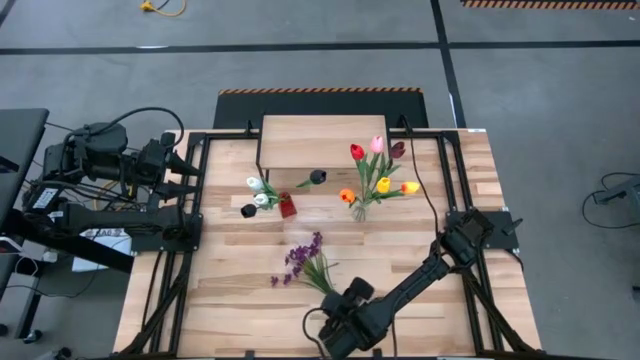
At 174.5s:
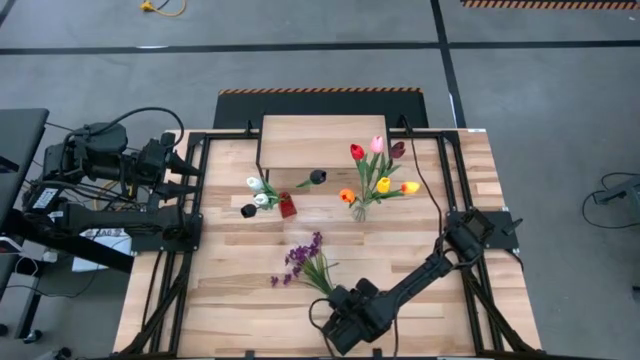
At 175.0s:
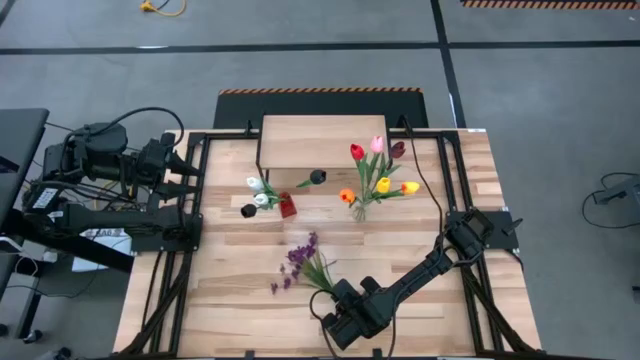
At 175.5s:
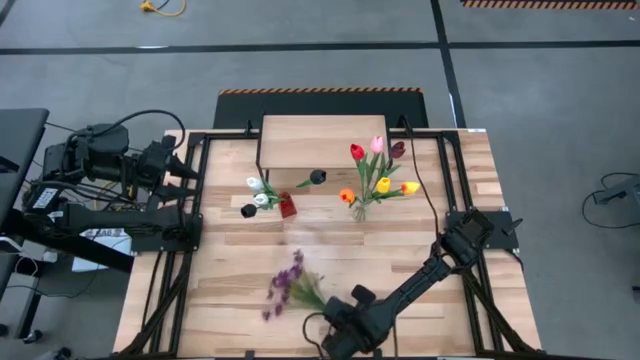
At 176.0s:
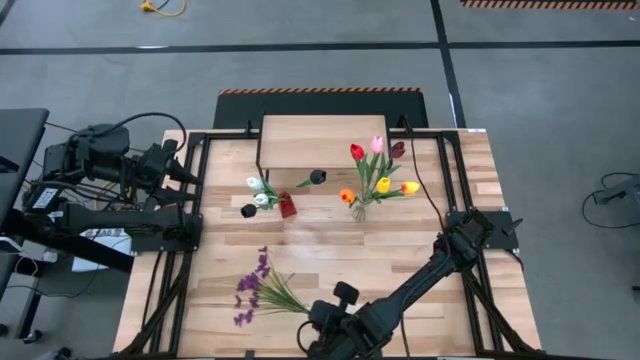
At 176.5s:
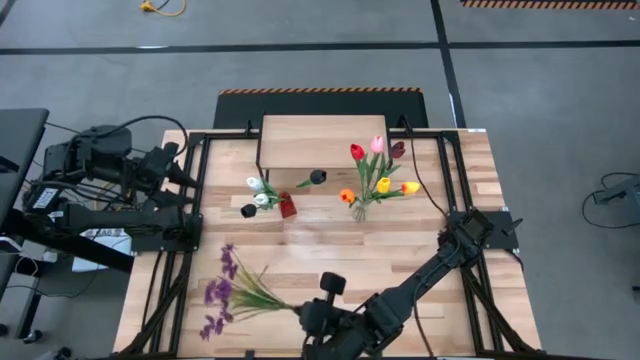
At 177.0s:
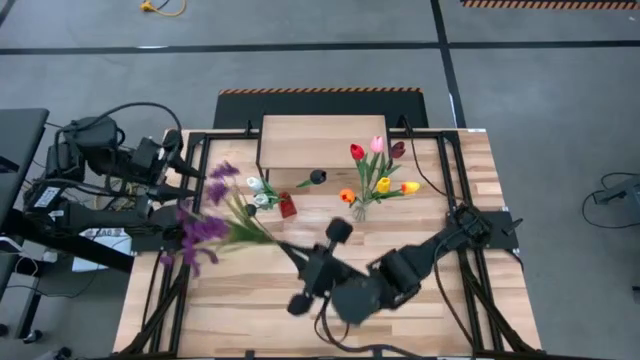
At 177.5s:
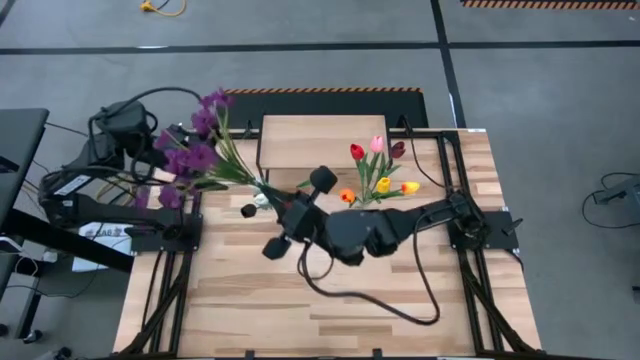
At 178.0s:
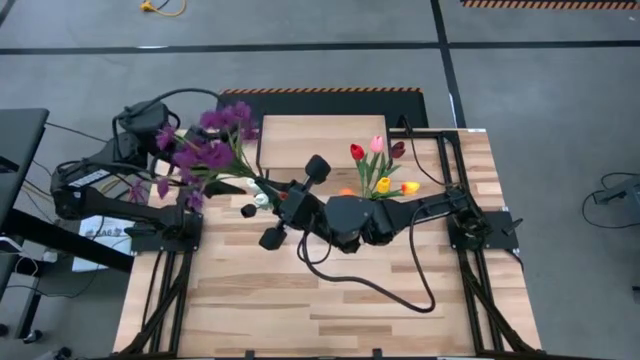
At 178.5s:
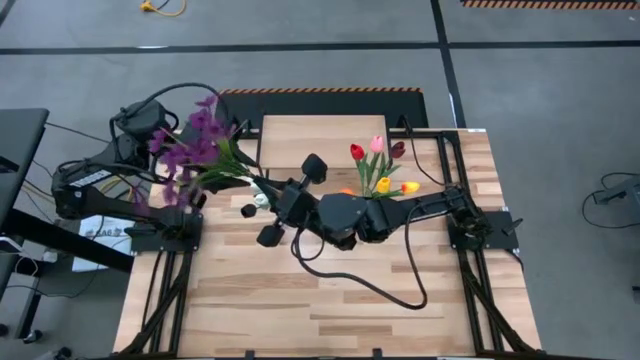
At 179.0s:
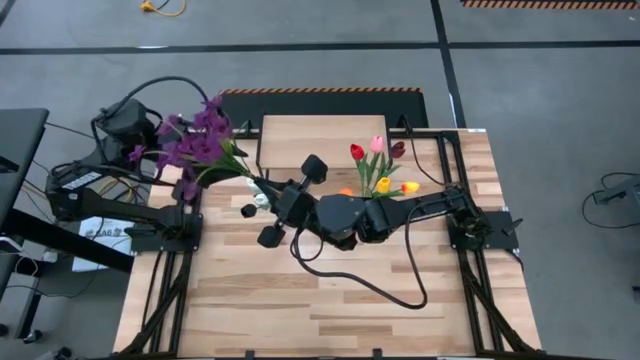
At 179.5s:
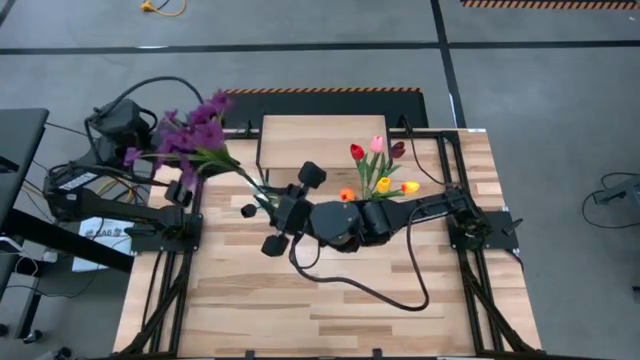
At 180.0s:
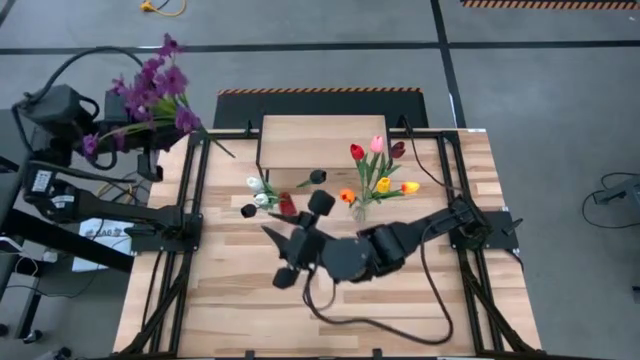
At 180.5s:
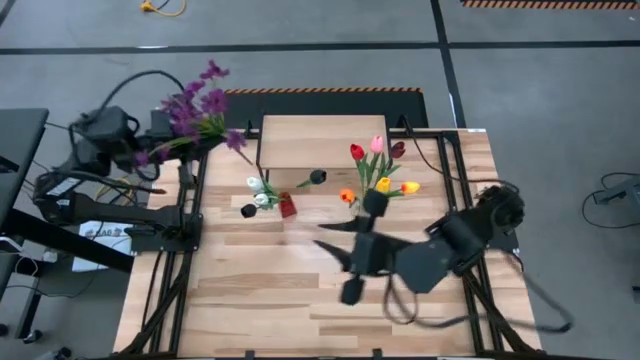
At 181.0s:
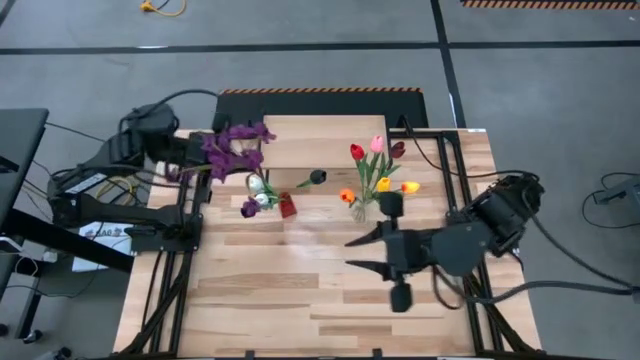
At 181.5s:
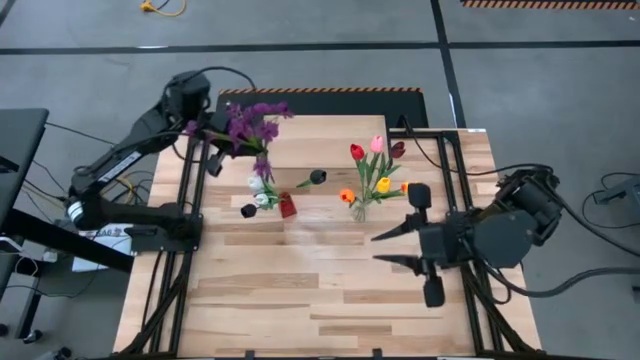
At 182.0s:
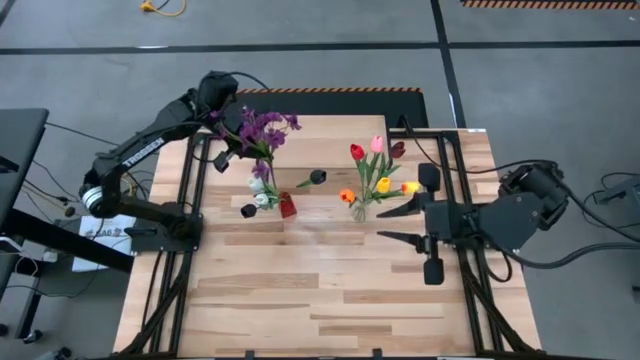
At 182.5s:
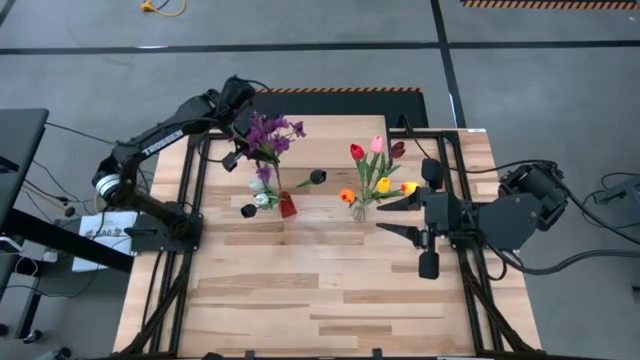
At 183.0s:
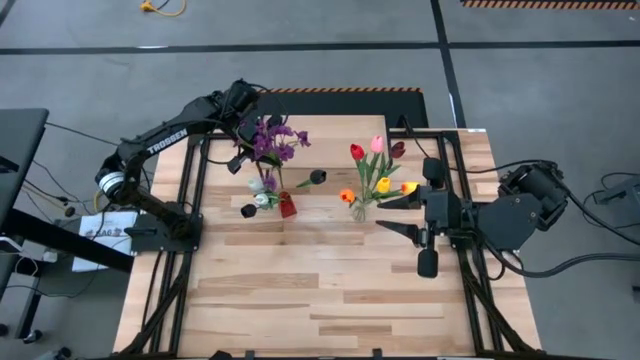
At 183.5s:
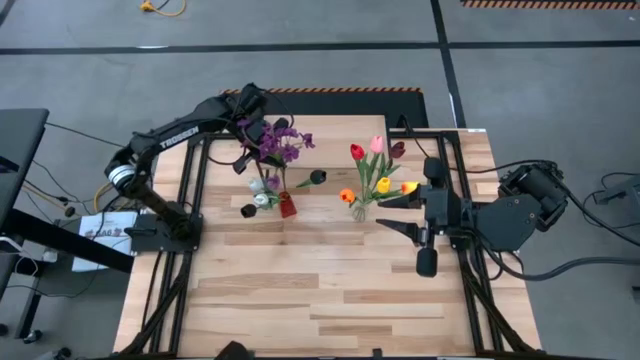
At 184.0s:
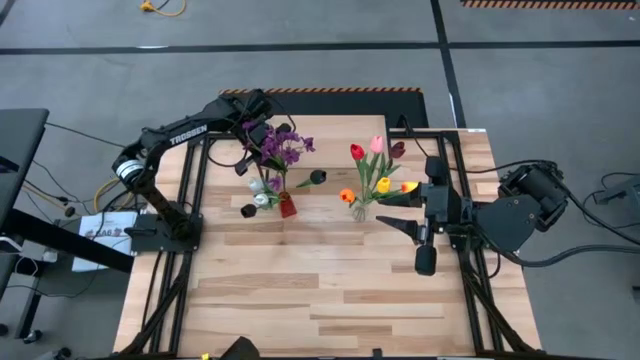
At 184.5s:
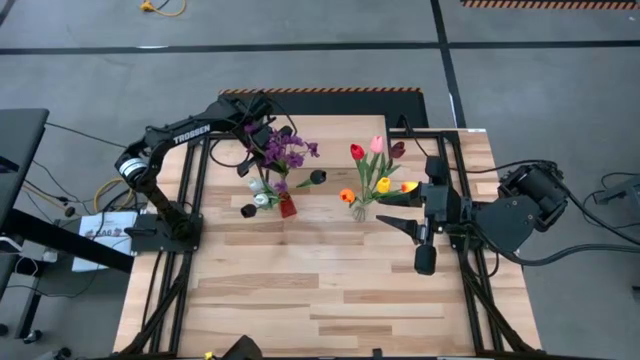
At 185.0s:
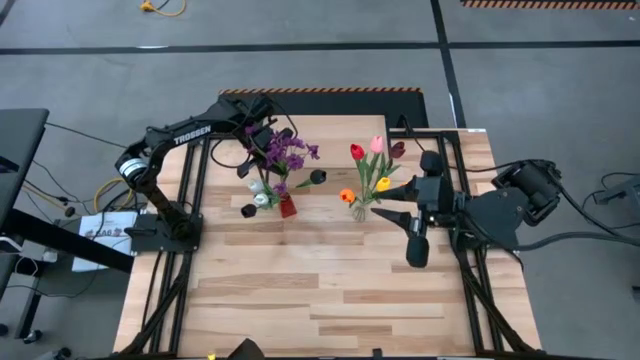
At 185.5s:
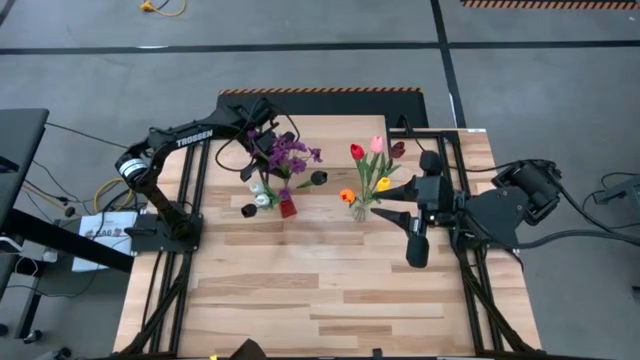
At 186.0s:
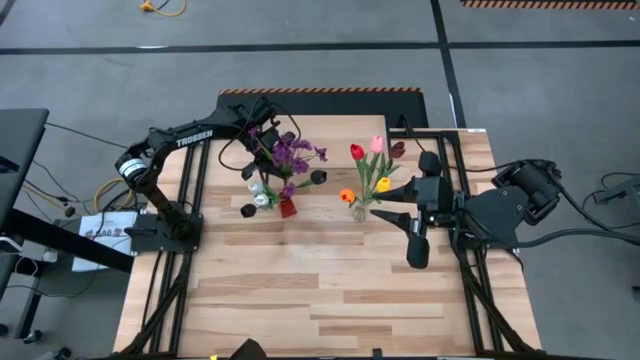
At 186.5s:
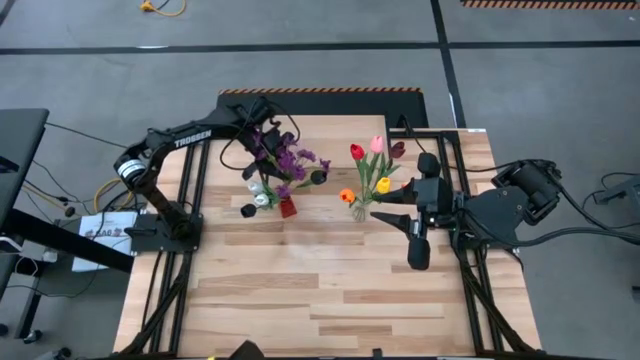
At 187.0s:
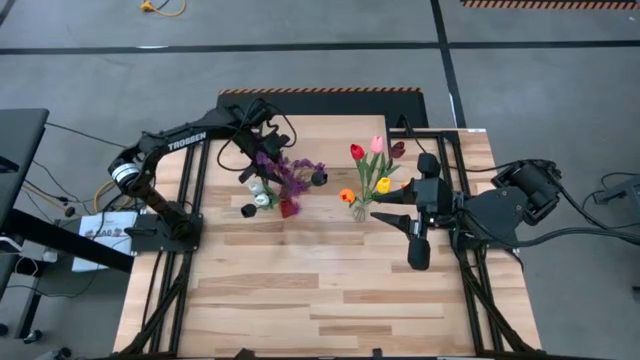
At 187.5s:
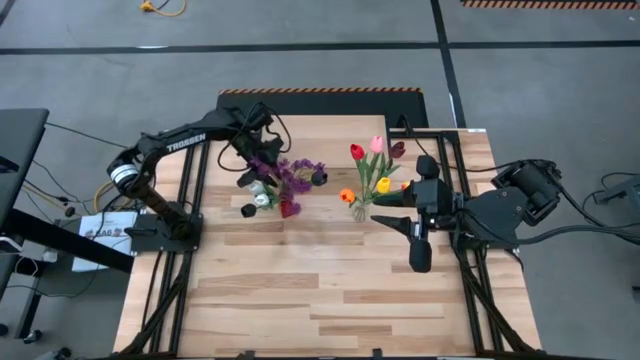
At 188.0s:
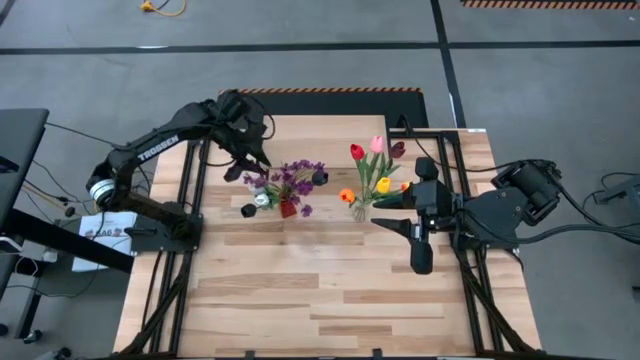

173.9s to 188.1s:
Task: Pick and place flowers into a vace then onto a shelf
Put the purple flowers into the red vase

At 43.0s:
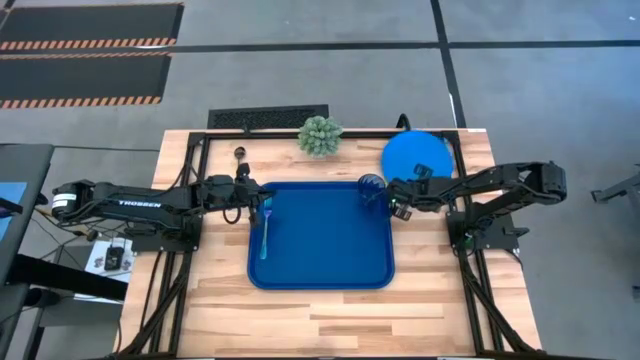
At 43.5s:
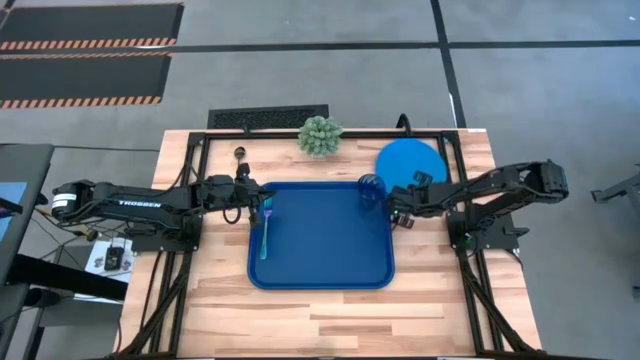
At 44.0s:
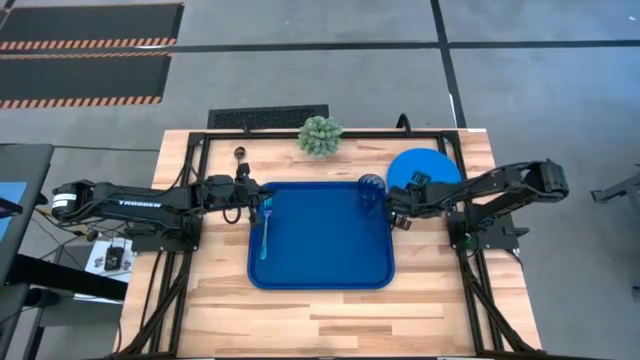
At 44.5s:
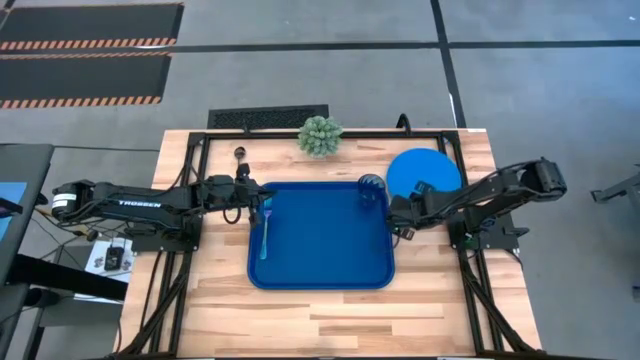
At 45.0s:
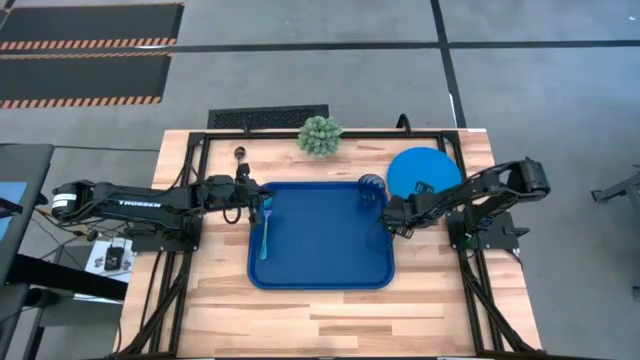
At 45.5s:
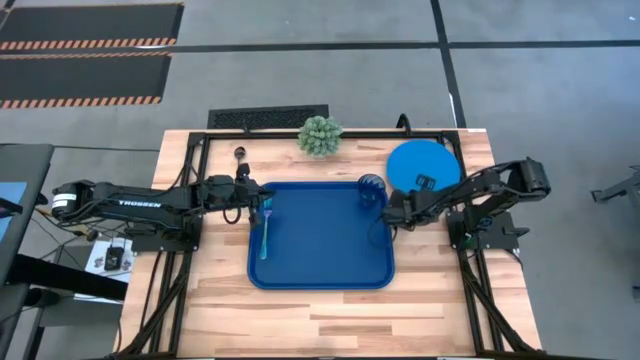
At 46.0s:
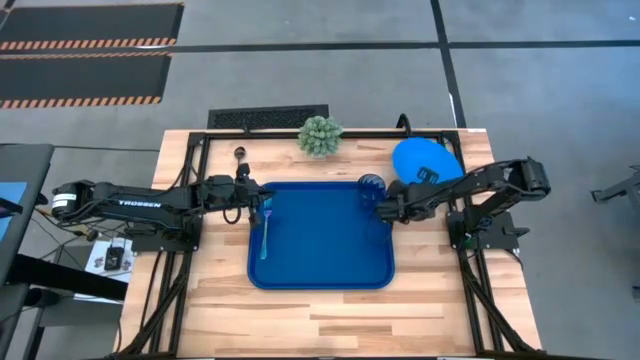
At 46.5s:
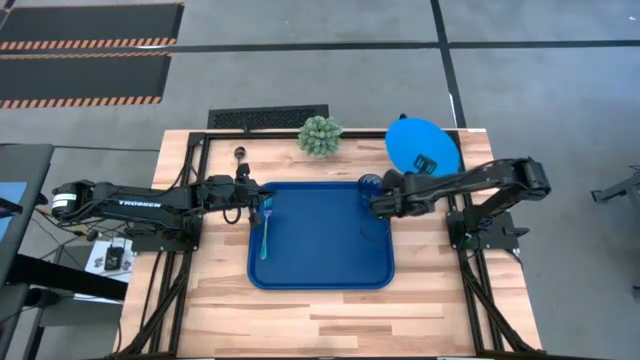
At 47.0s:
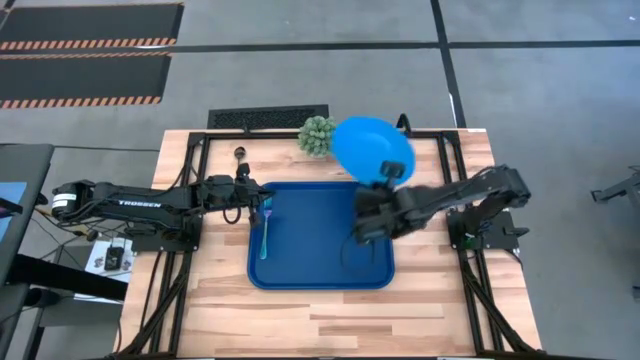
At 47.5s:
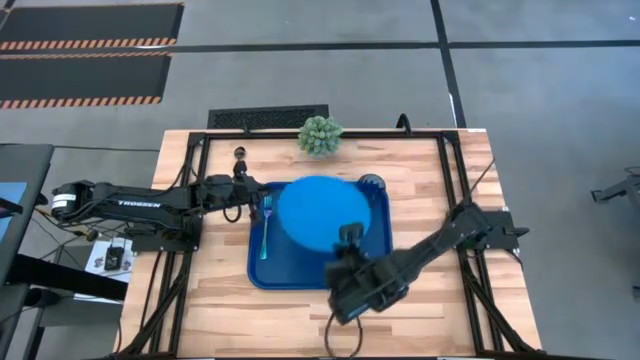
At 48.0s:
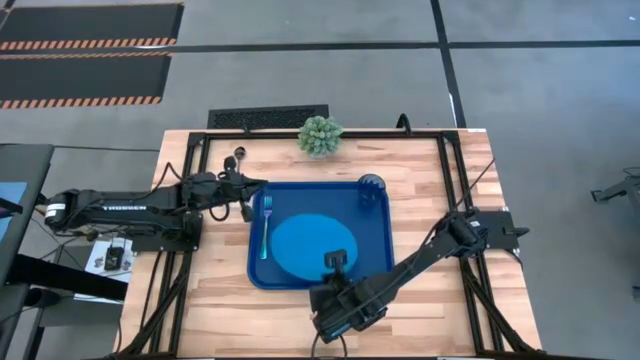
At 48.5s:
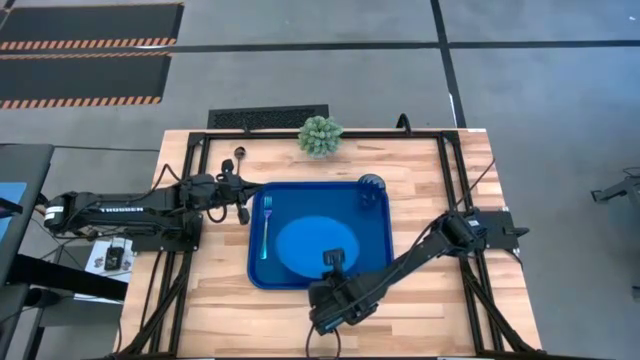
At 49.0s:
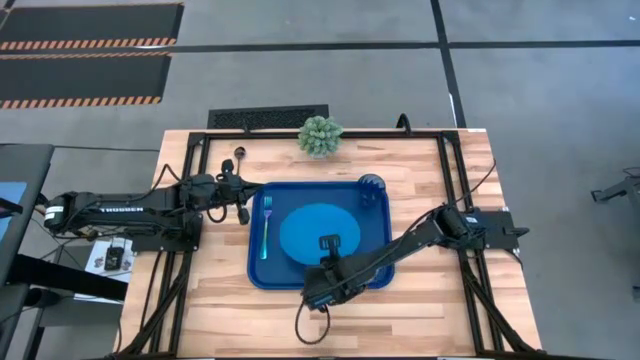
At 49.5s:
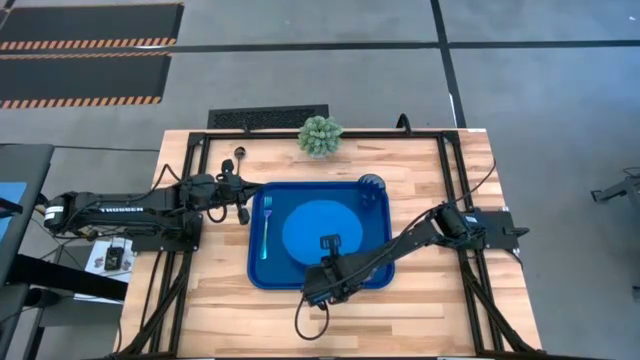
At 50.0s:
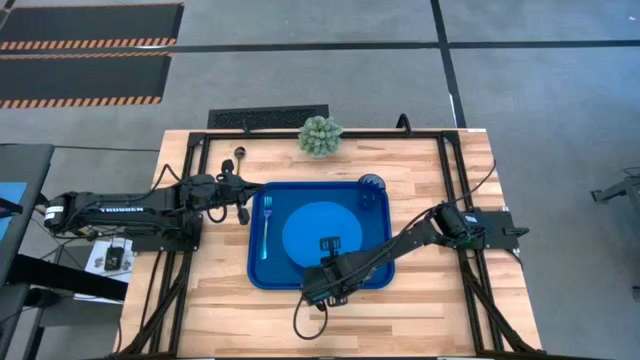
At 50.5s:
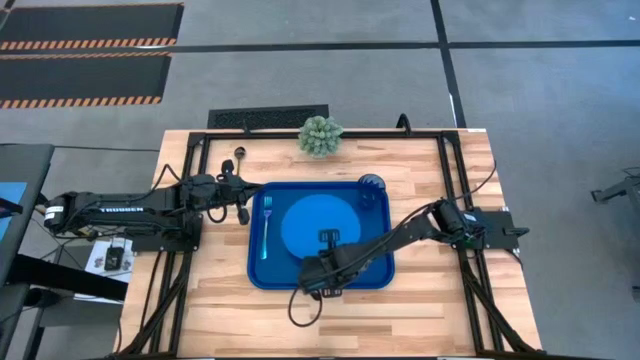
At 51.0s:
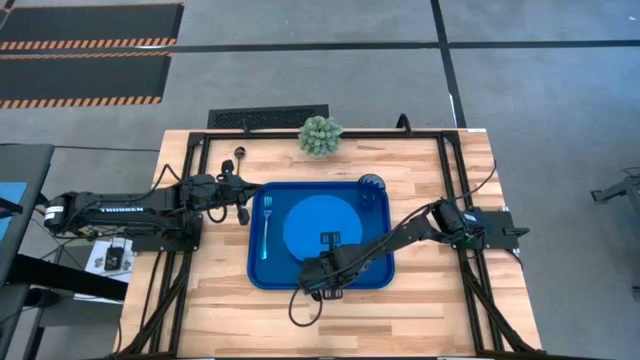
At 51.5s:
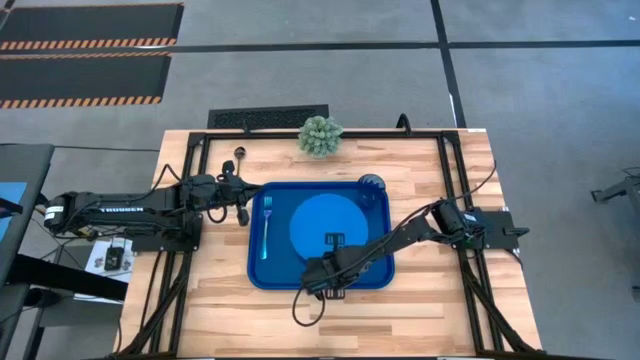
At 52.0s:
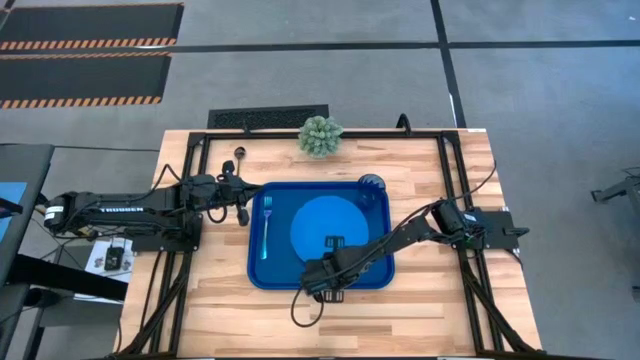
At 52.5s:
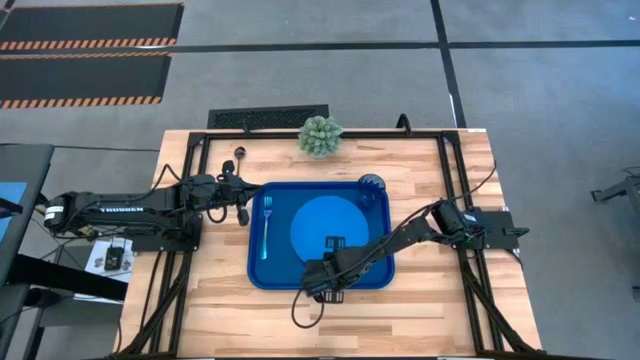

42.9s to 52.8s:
Task: Pick and place plate/cup/fork/spoon on tray
Put the blue plate to the right of the fork on the blue serving tray
